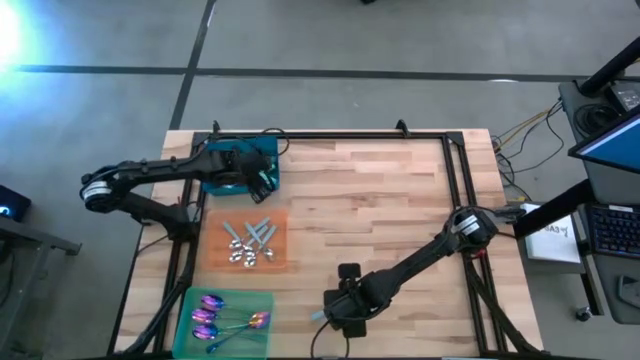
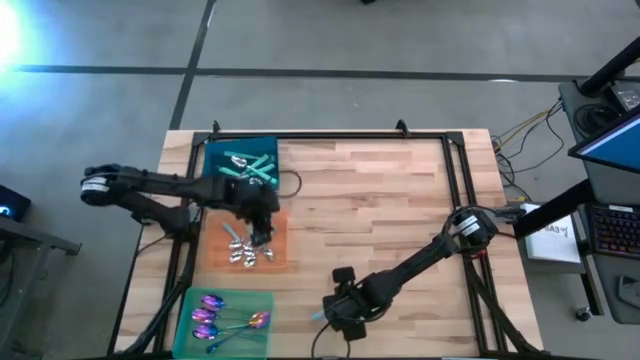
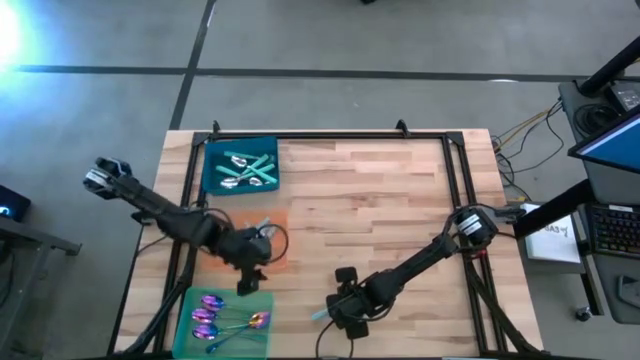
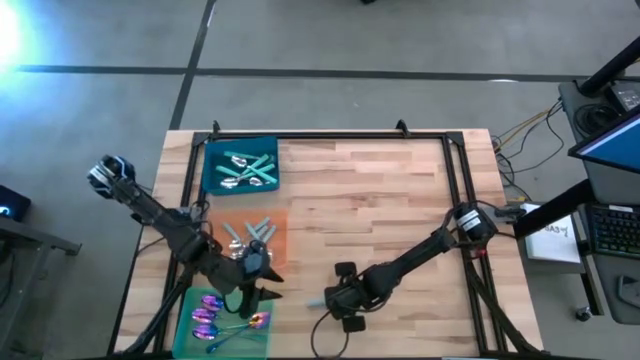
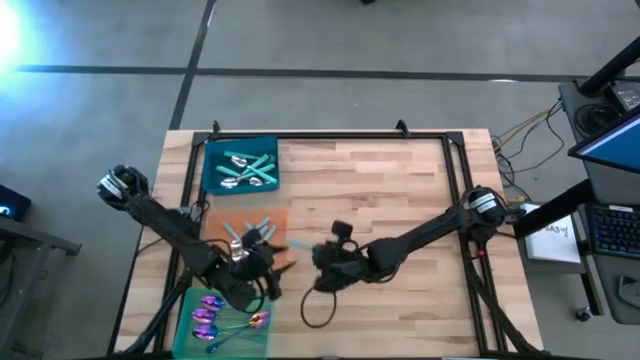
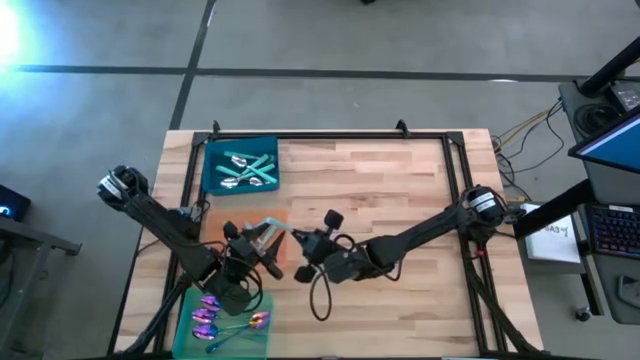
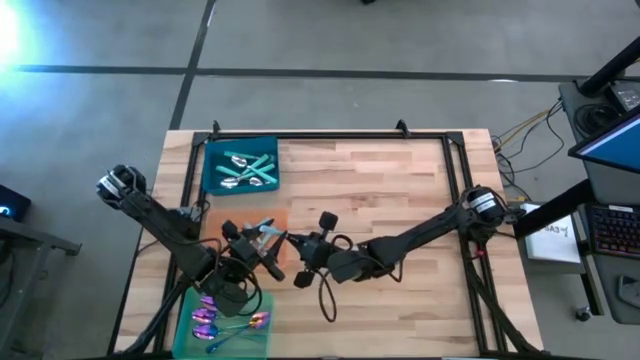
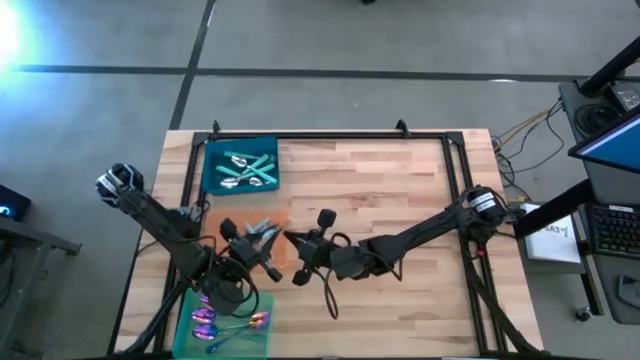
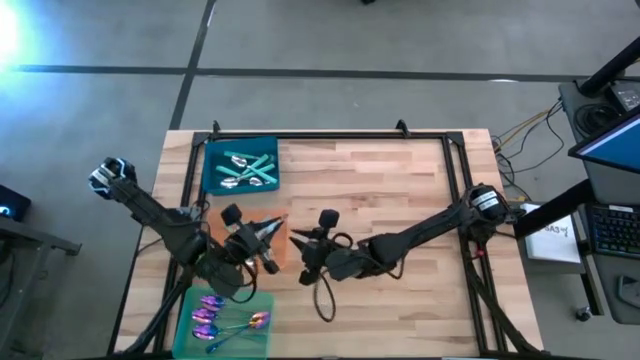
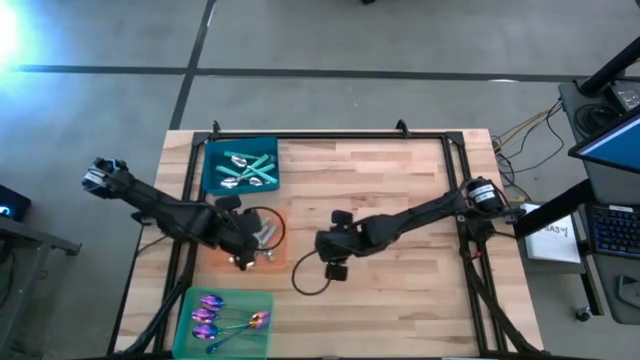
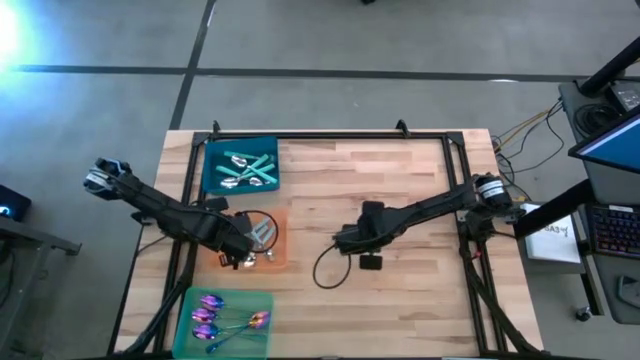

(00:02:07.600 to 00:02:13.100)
Task: Sort silverware by color (type)
Put the blue spoon into the orange bin

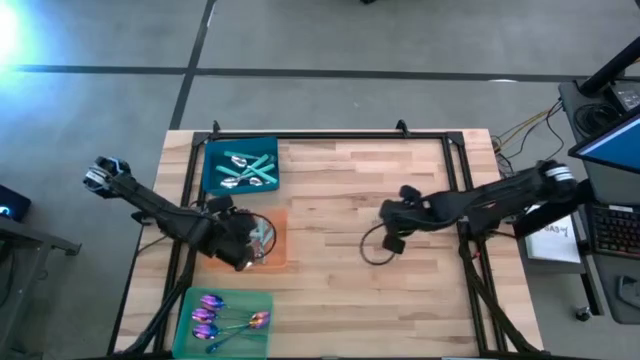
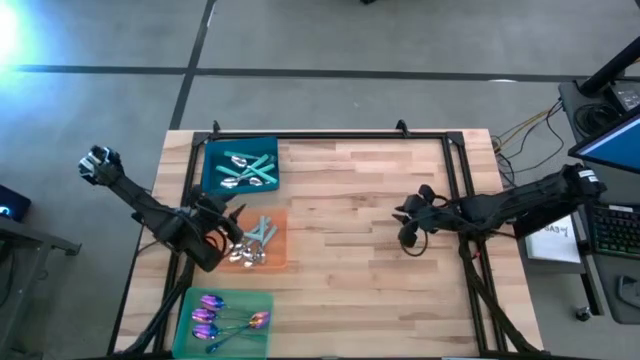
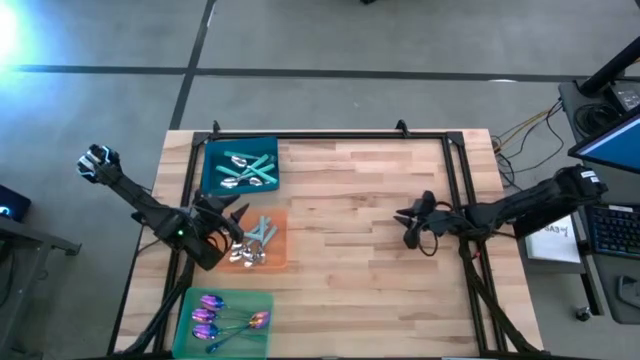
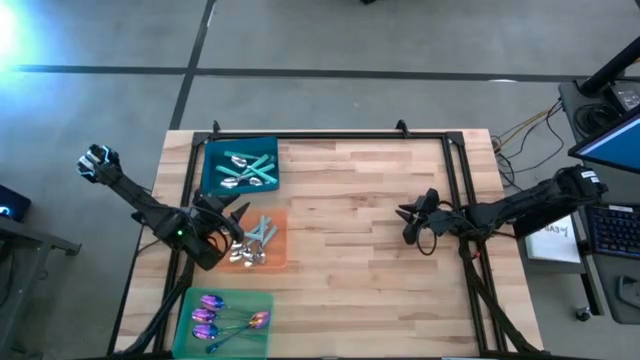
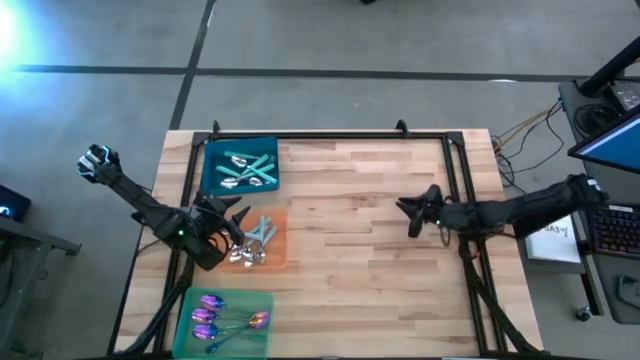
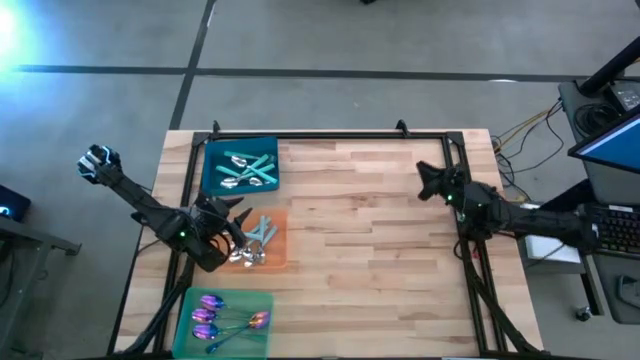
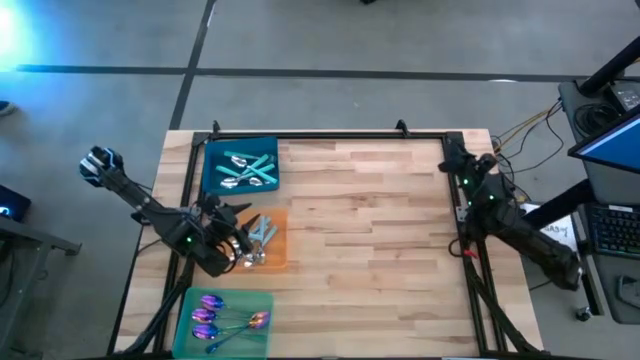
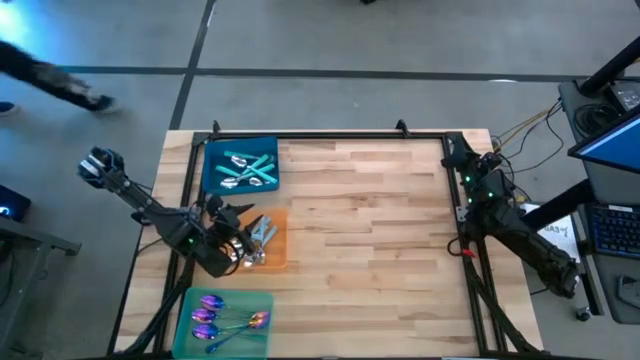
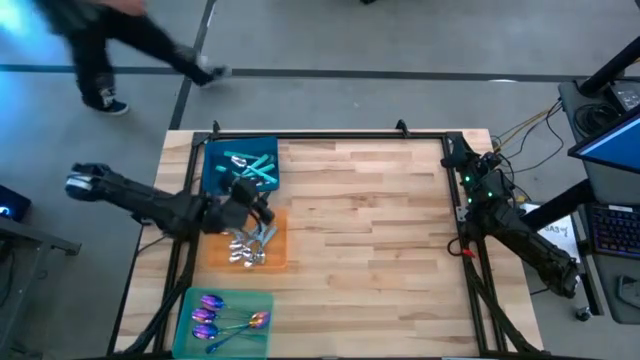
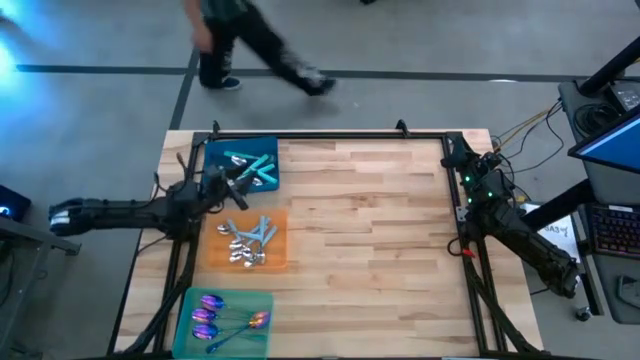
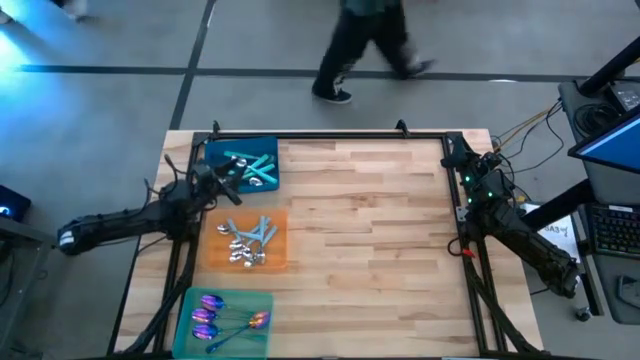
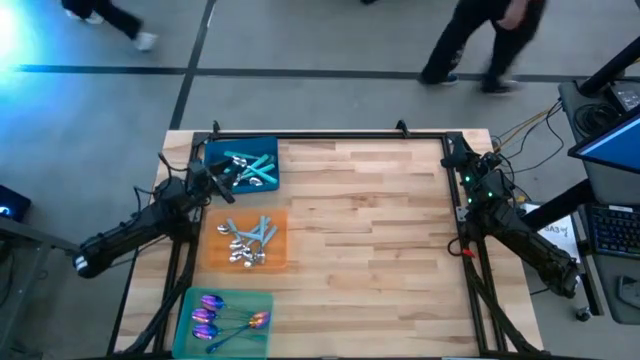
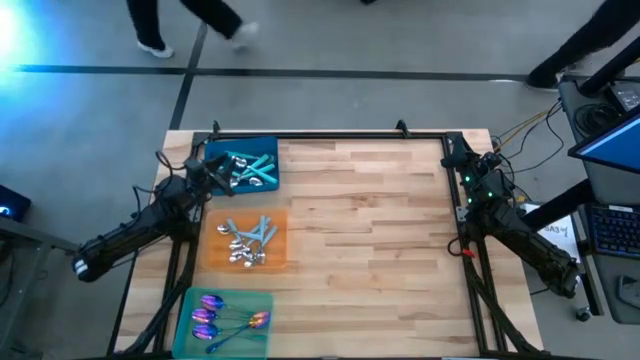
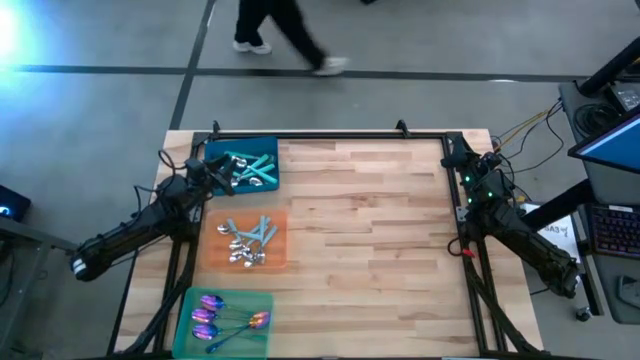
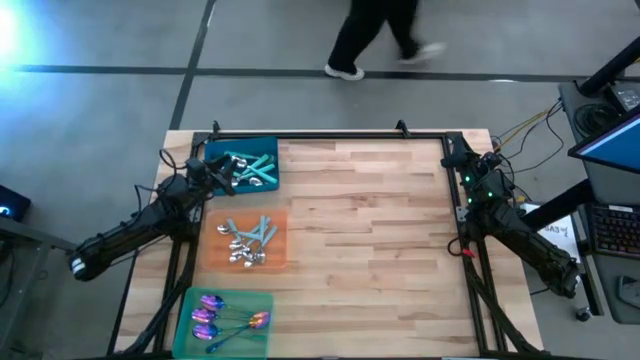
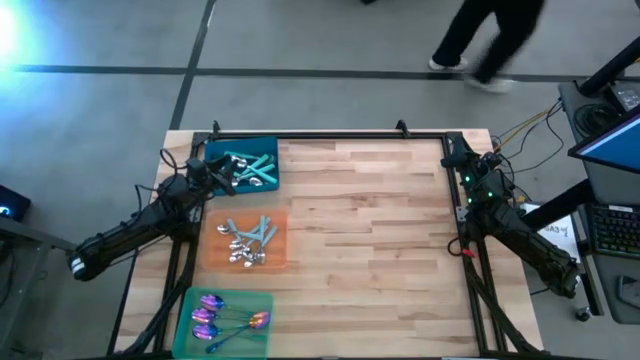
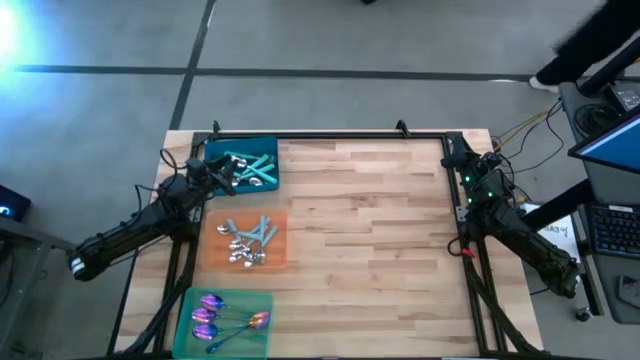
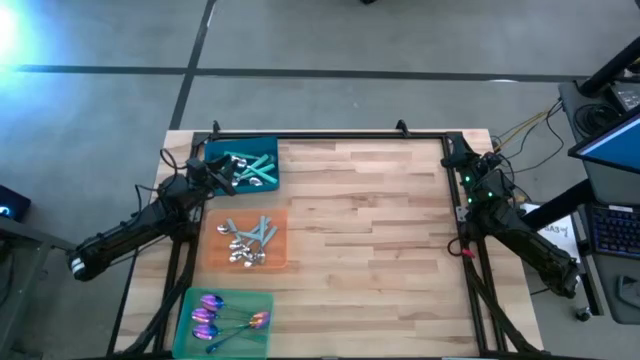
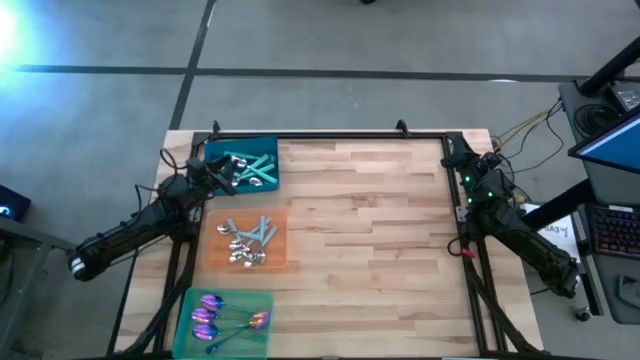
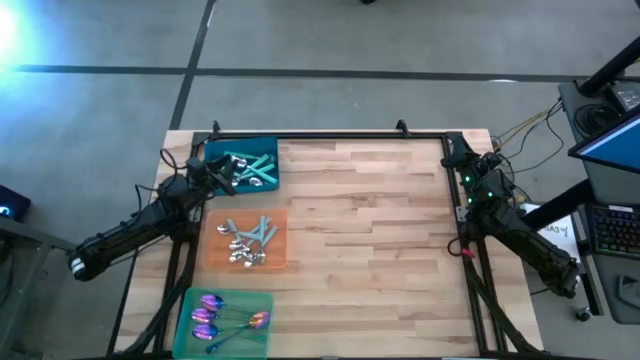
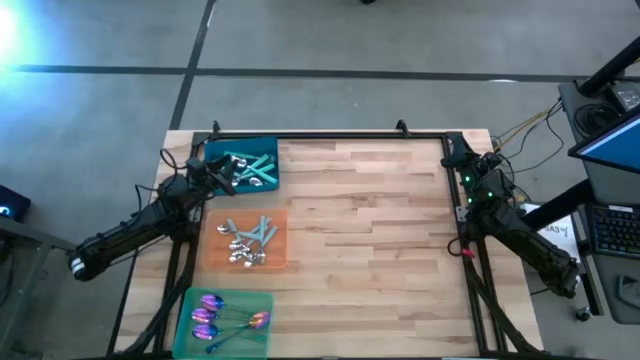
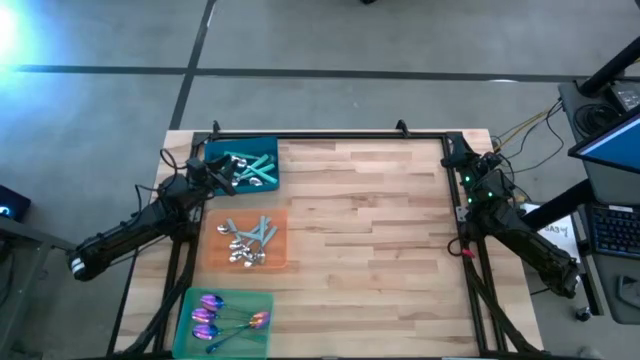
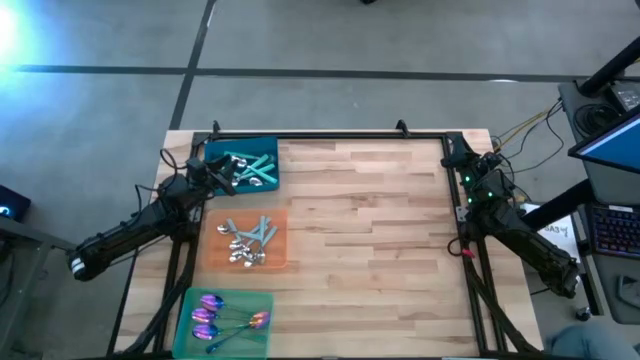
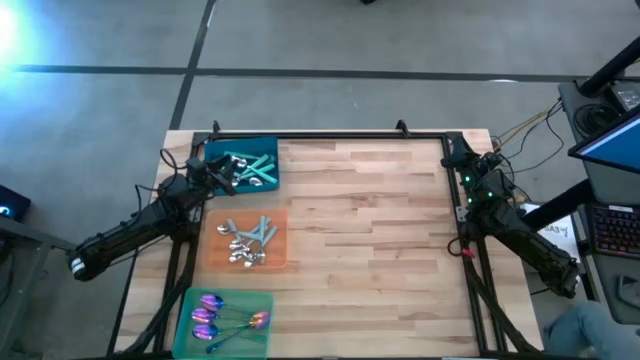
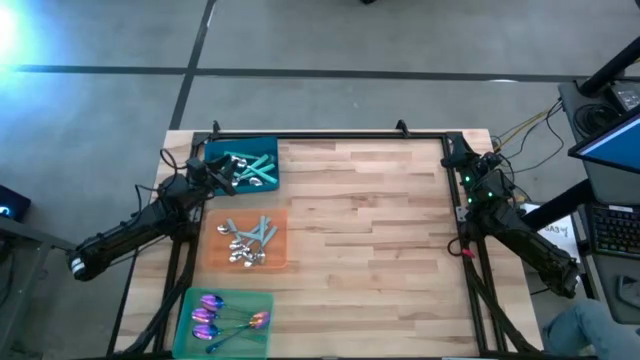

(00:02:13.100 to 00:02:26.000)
Return to Home Position

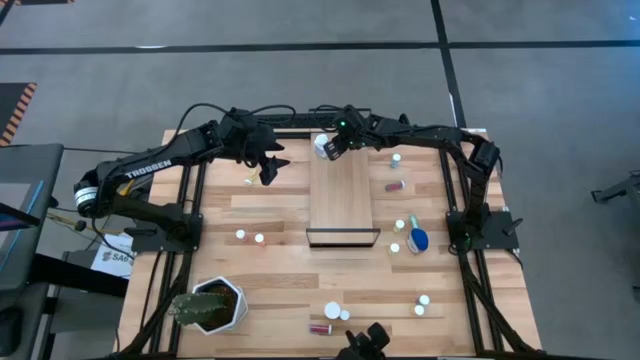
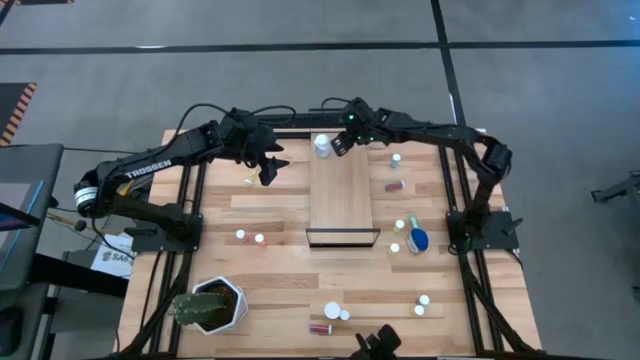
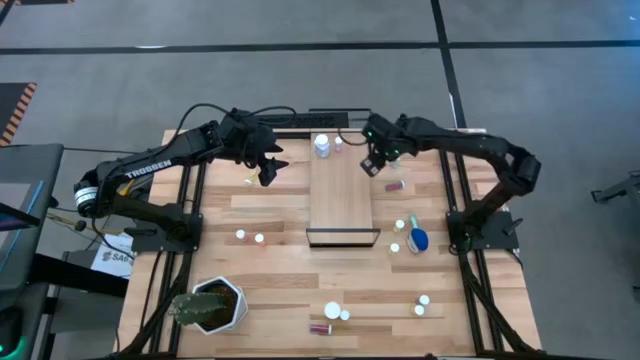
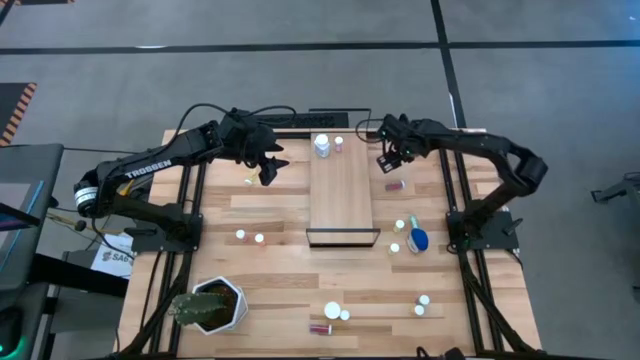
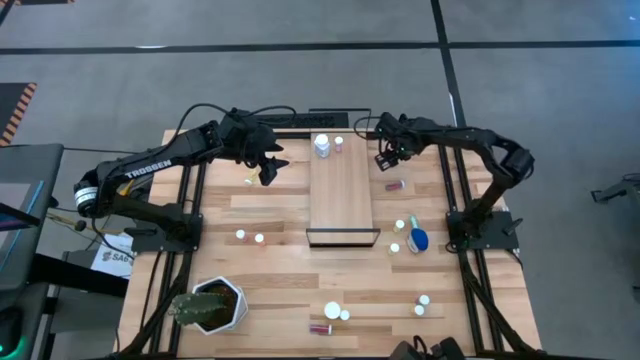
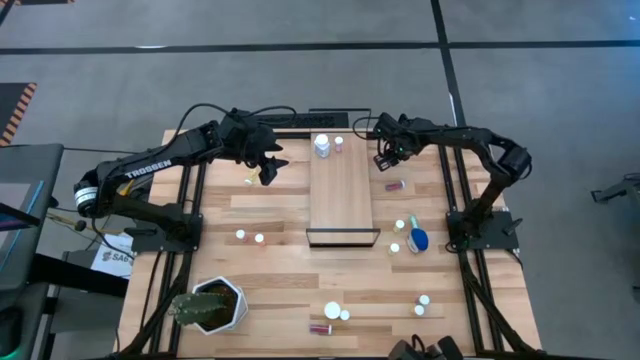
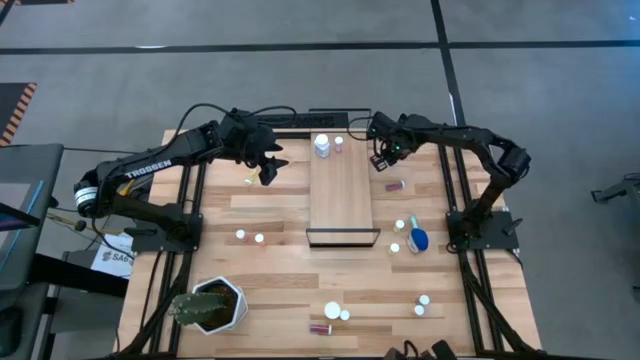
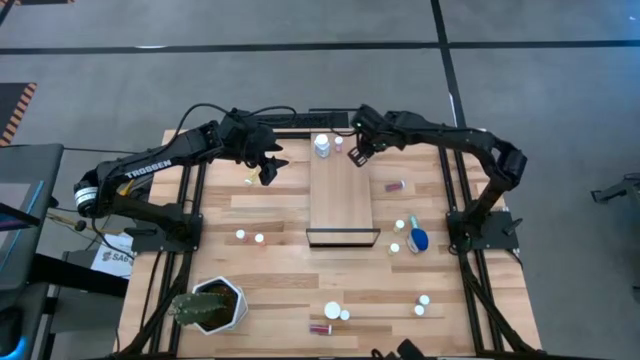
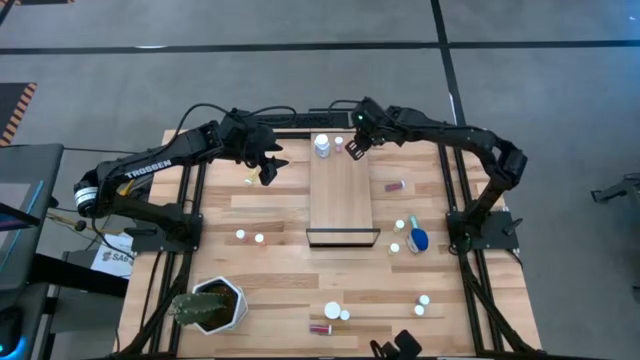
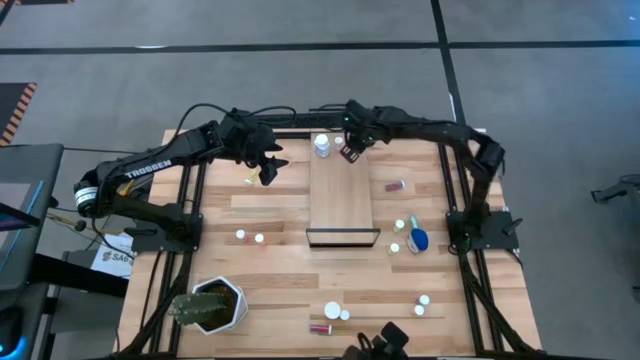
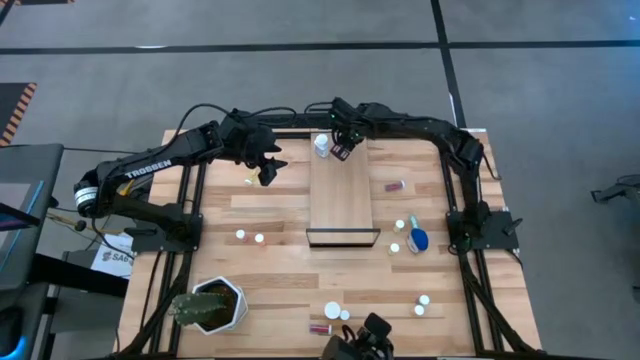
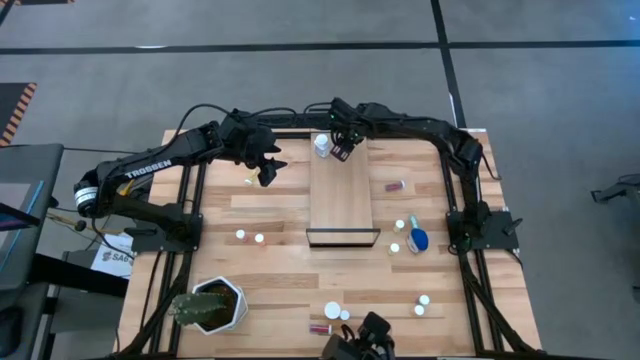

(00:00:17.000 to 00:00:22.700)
Task: Pick and place medicine bottles onto shelf by color
Put the blue pill bottle on the shelf
